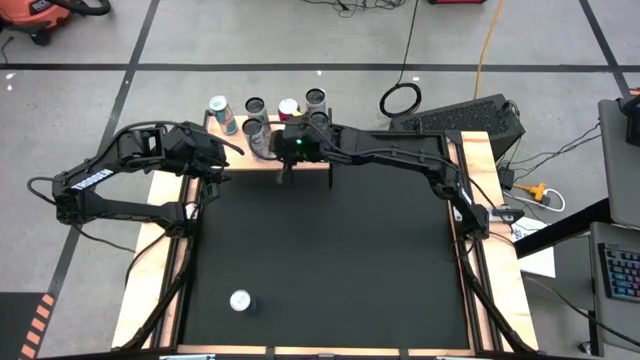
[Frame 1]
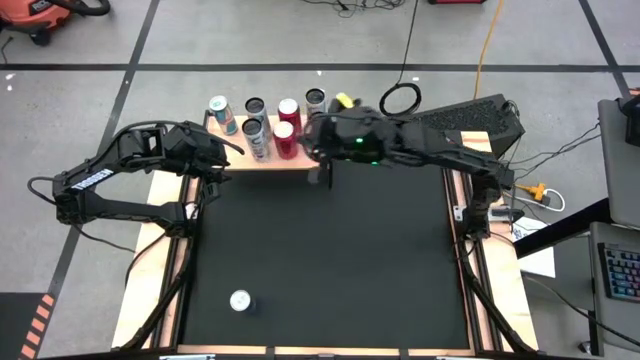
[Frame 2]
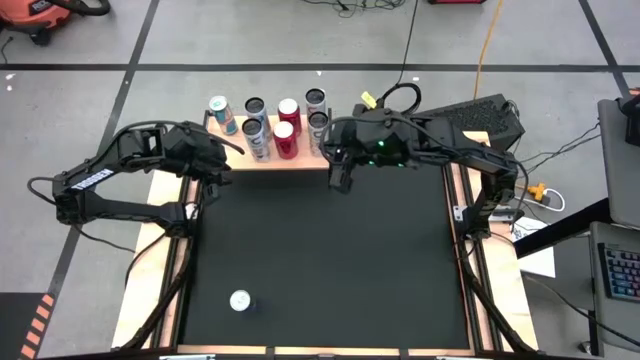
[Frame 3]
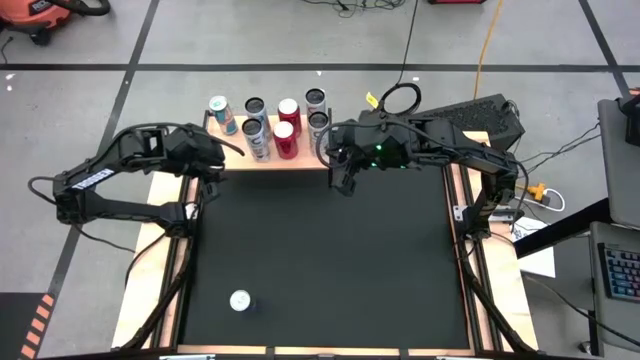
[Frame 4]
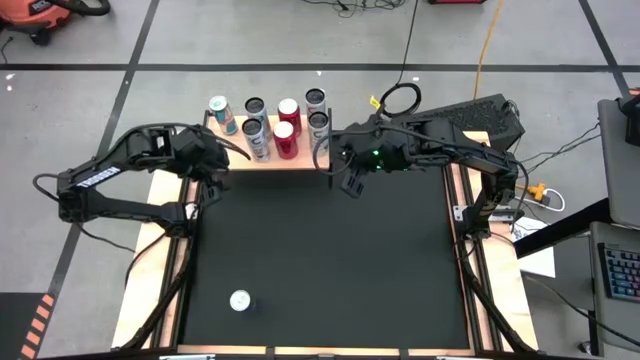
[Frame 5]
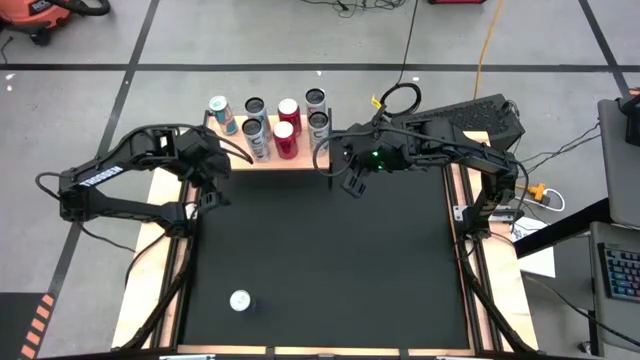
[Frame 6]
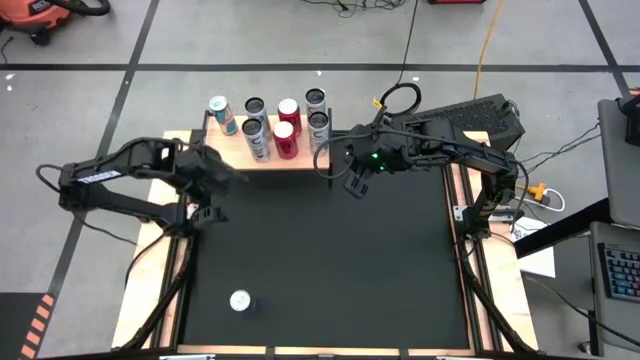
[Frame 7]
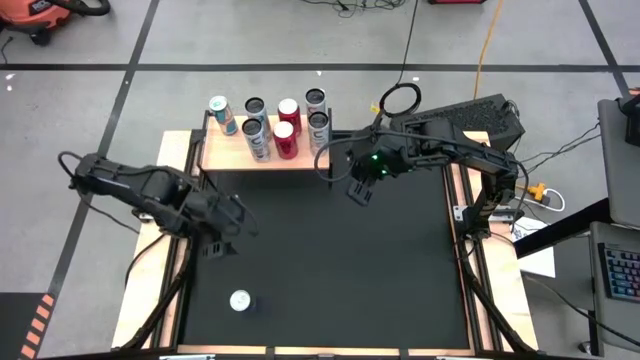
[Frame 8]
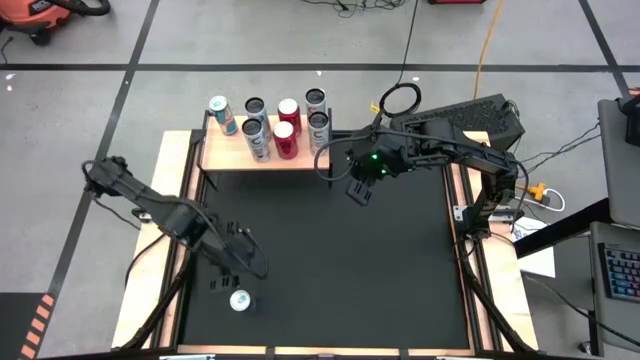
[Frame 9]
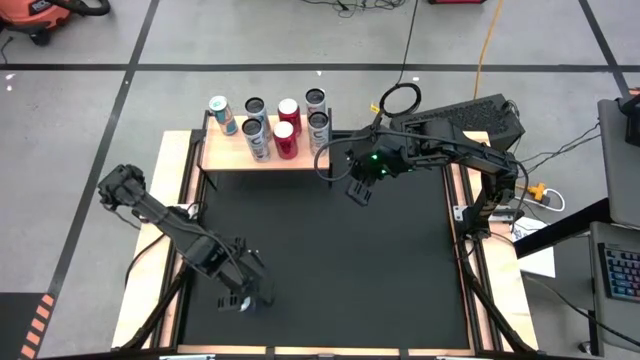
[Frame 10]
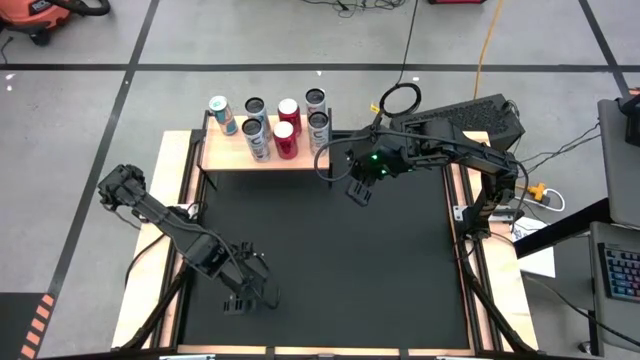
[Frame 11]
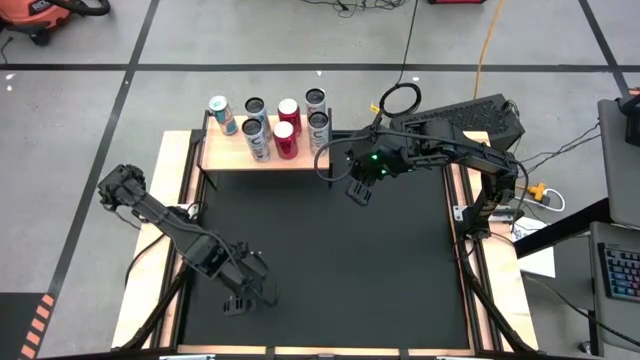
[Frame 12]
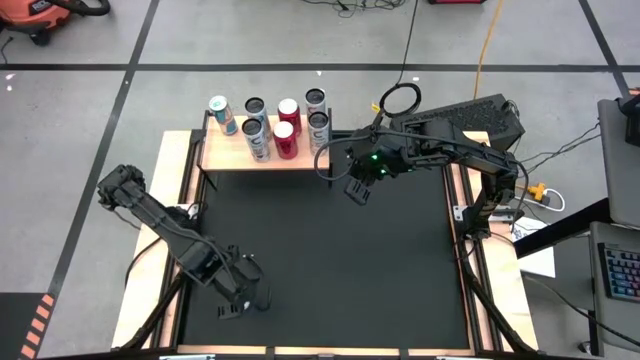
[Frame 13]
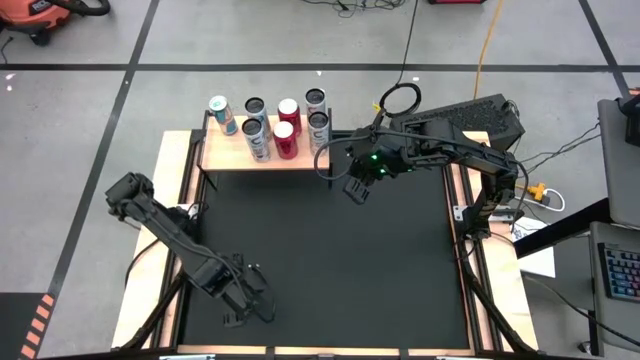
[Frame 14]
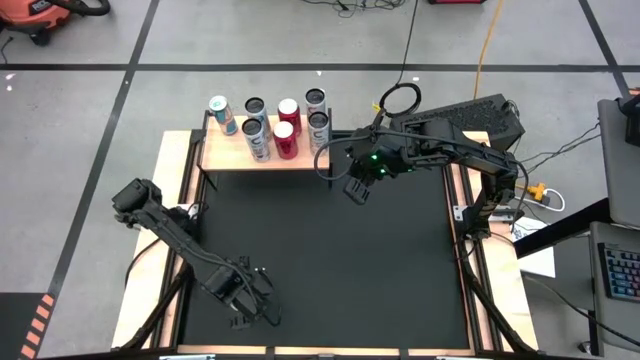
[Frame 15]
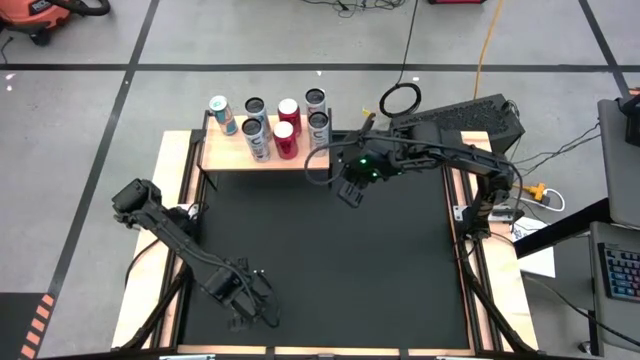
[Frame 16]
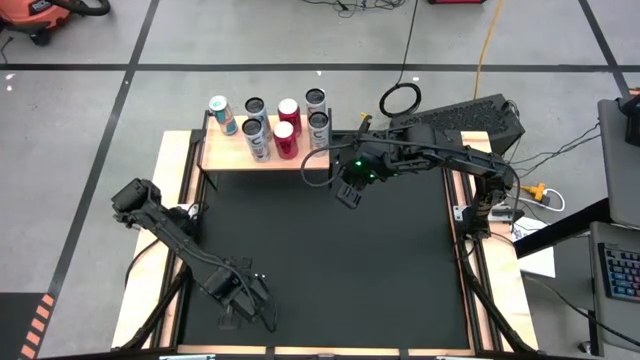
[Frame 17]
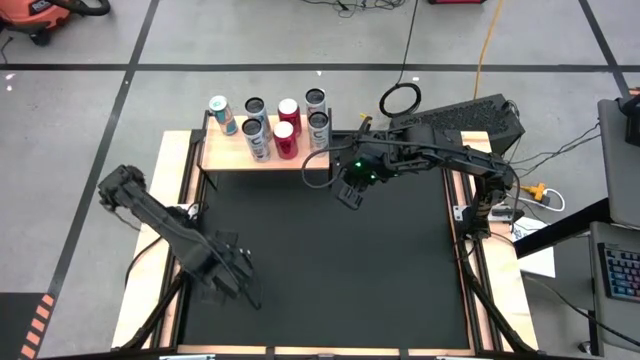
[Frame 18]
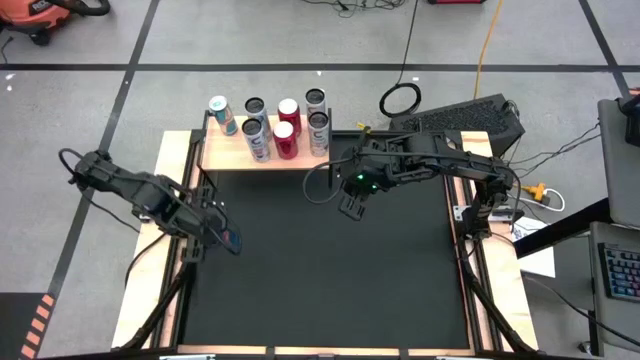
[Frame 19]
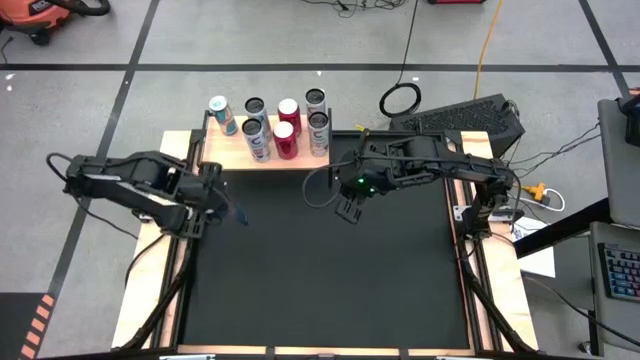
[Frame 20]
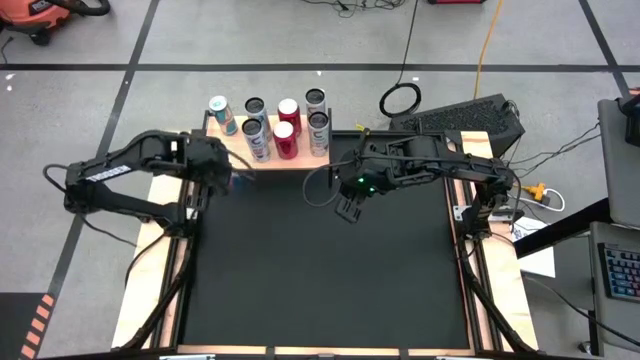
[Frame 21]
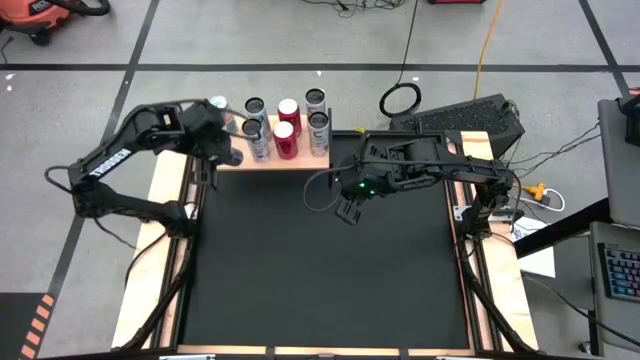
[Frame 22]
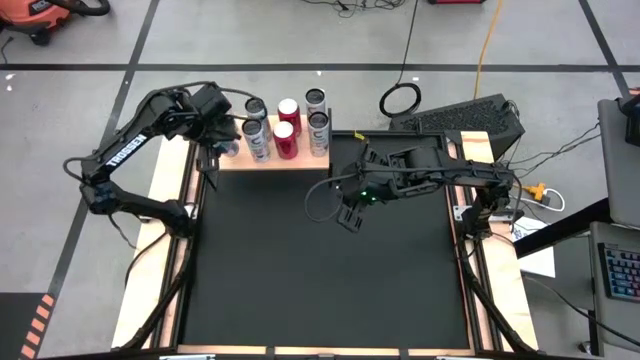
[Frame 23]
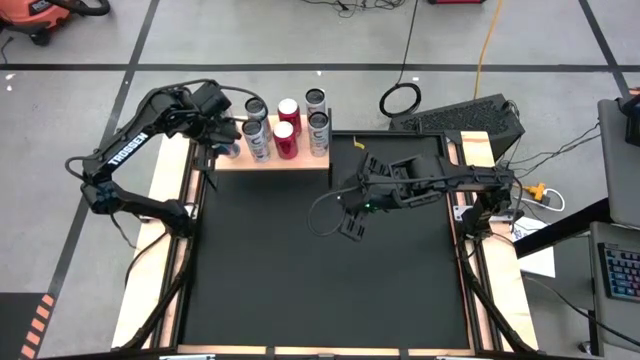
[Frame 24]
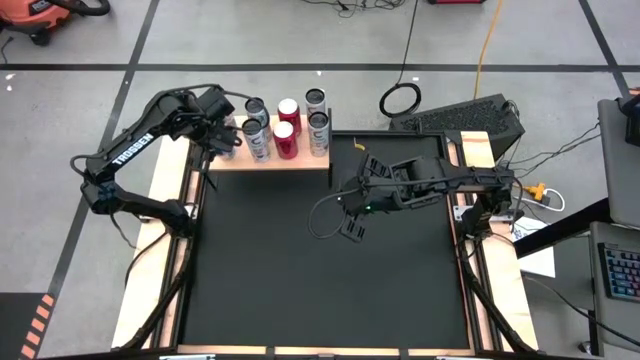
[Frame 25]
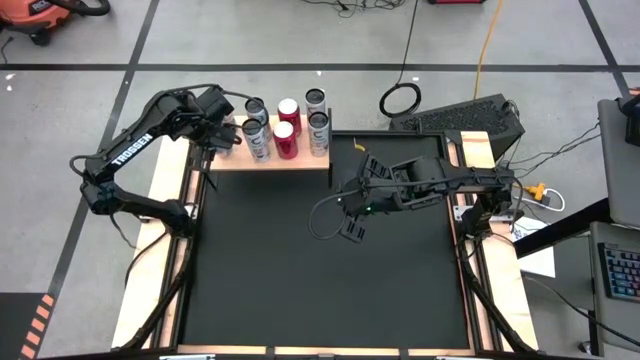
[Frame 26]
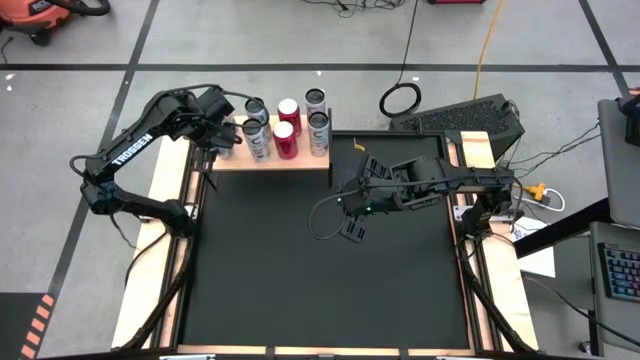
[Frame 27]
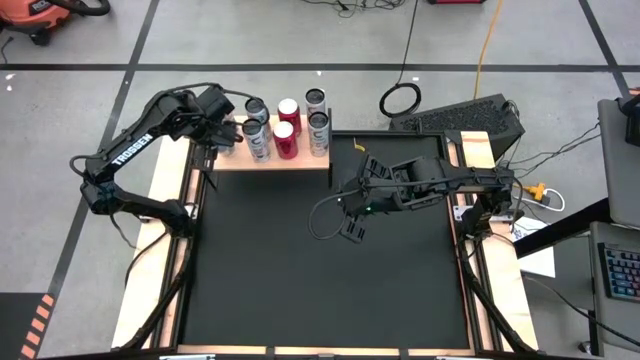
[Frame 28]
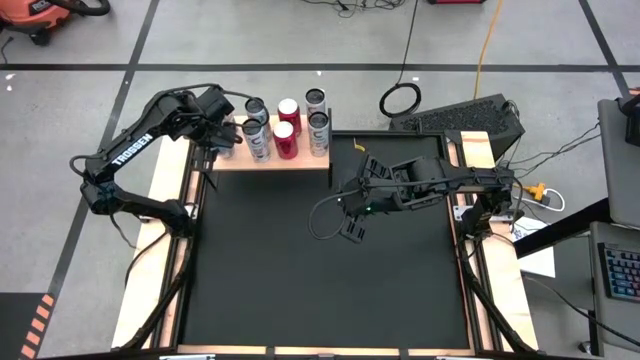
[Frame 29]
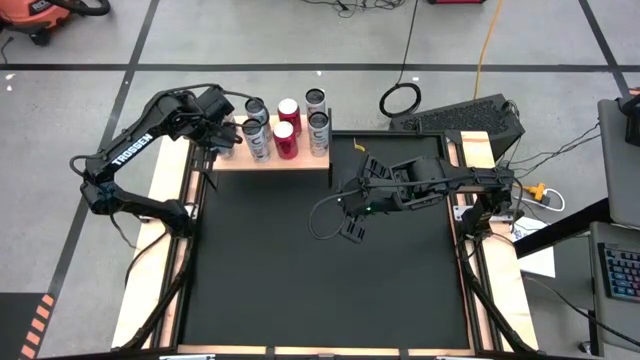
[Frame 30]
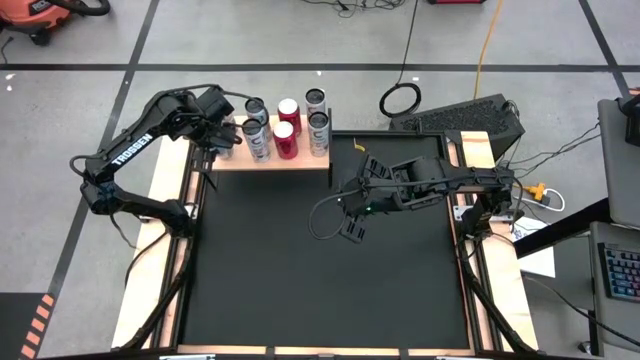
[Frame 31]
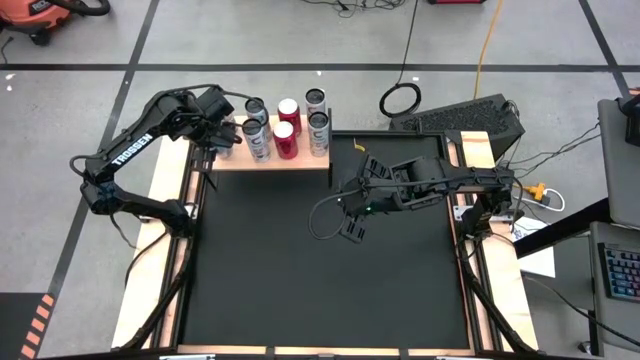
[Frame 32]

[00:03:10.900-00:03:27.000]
Task: Place canned beverage on shelf
Put the blue soda can on the shelf aligned with the other blue soda can
